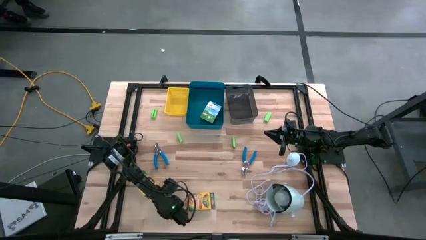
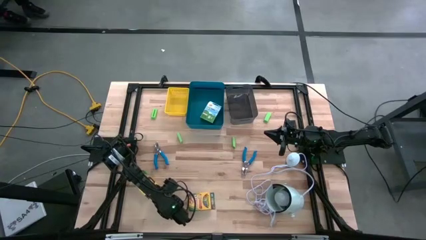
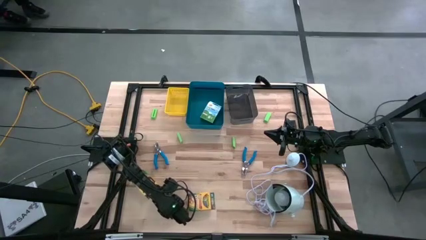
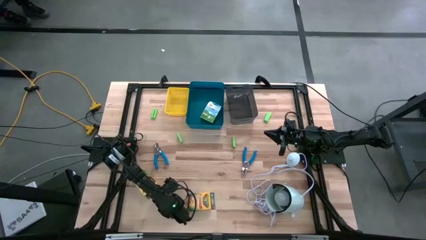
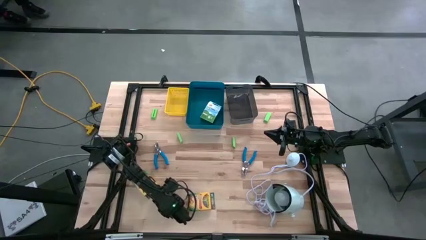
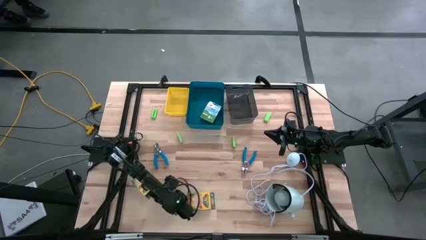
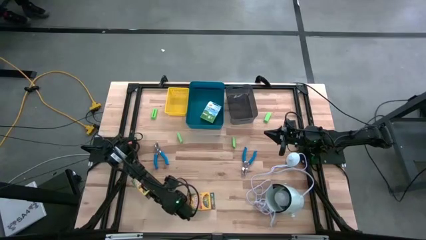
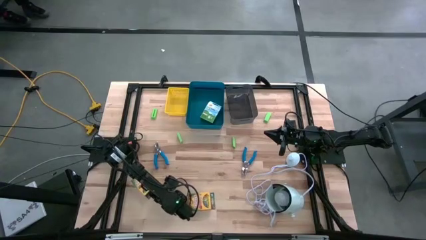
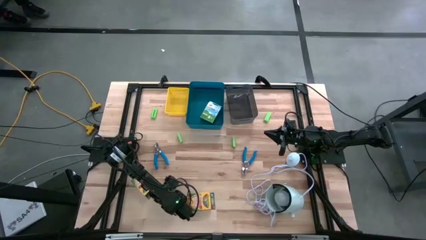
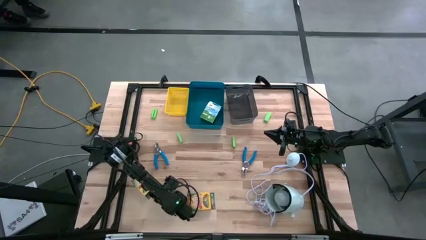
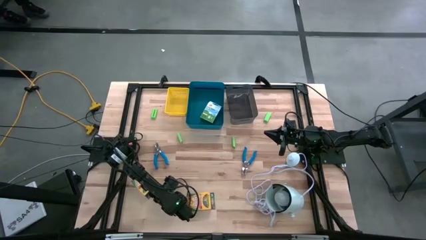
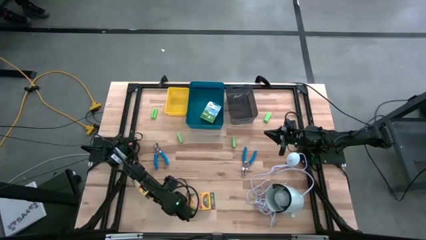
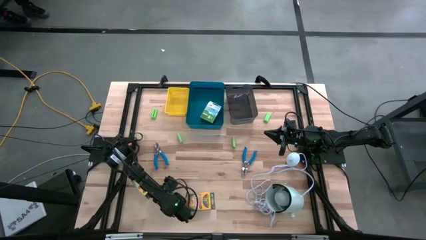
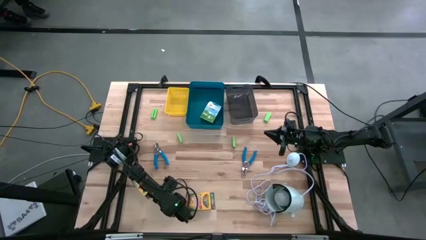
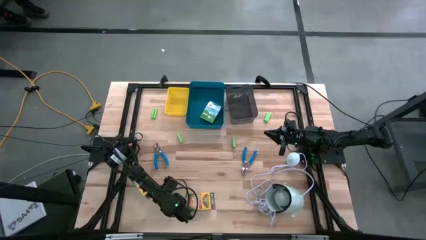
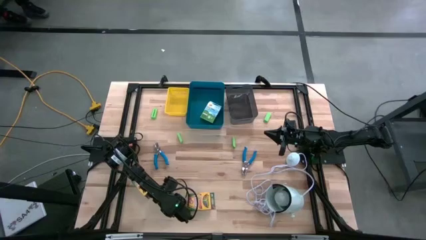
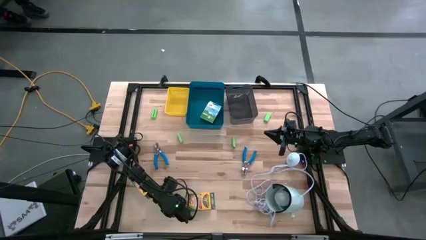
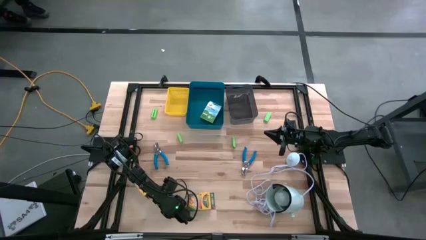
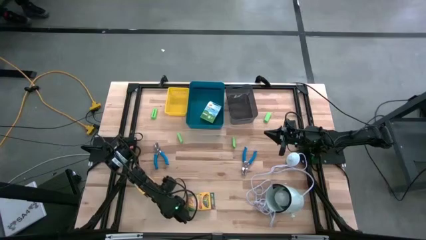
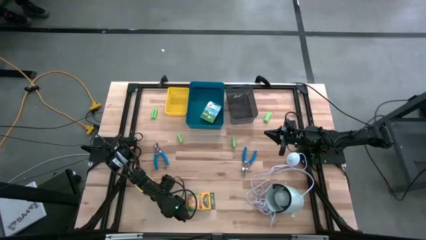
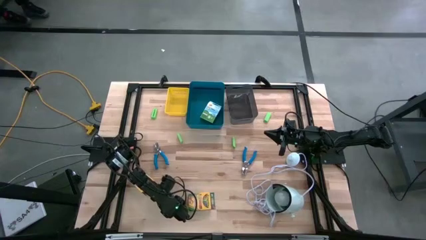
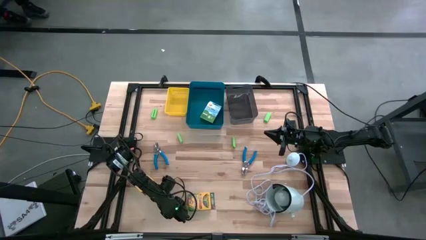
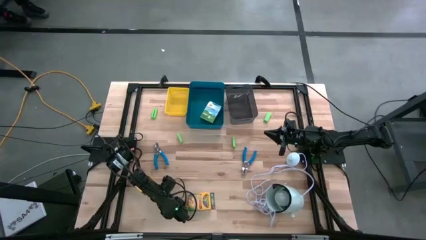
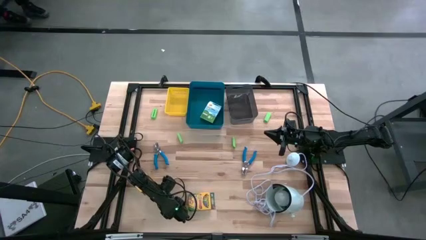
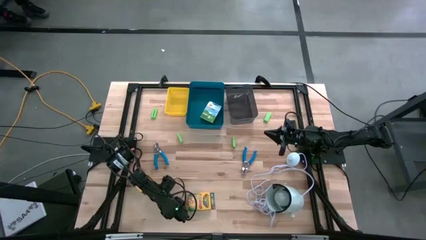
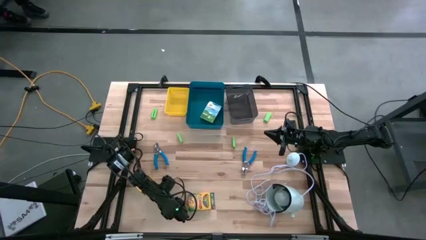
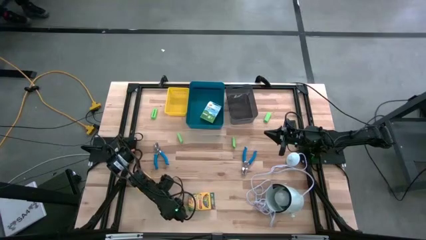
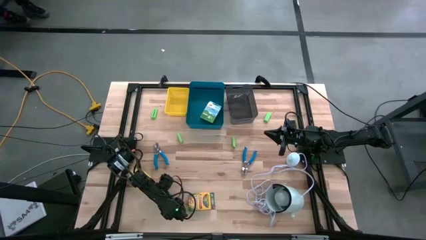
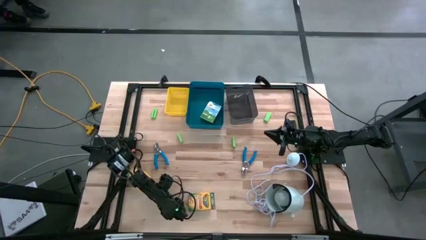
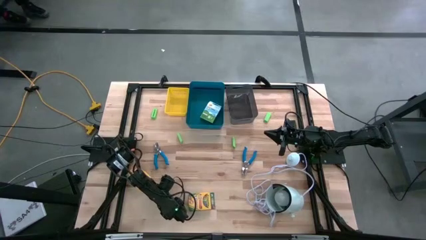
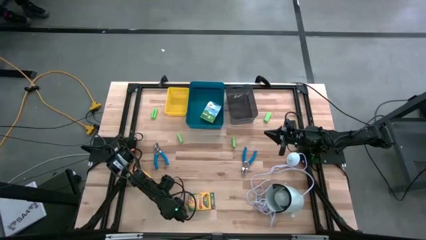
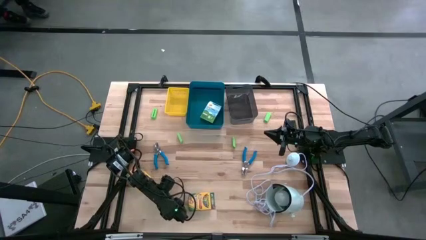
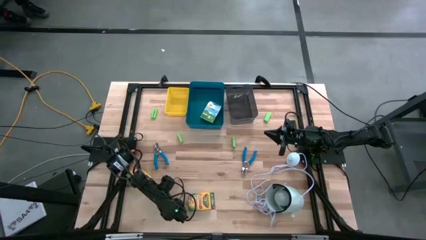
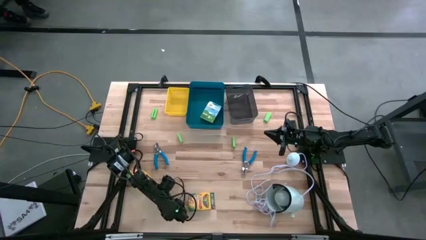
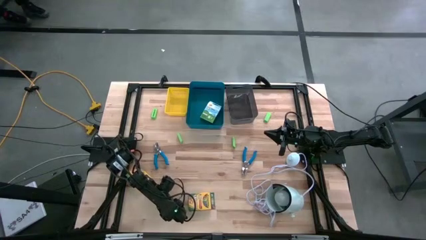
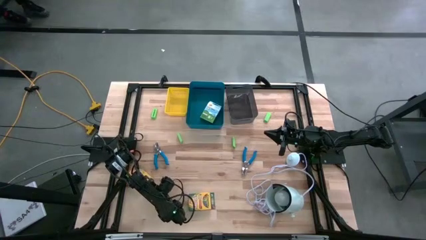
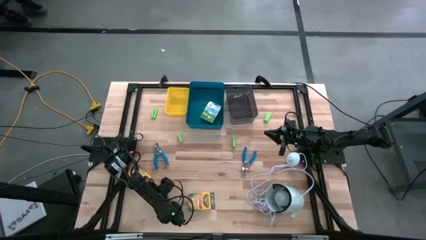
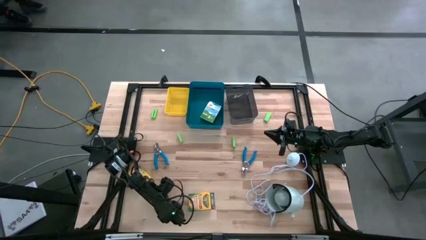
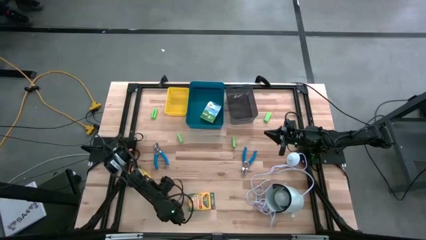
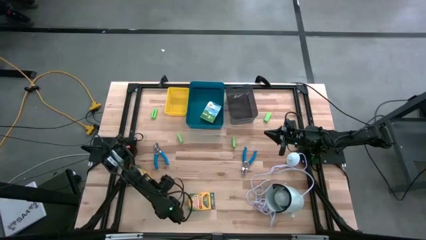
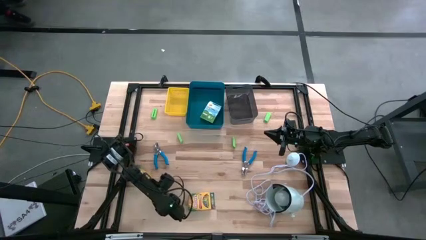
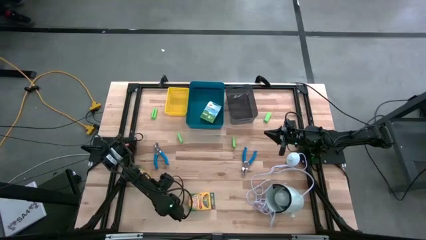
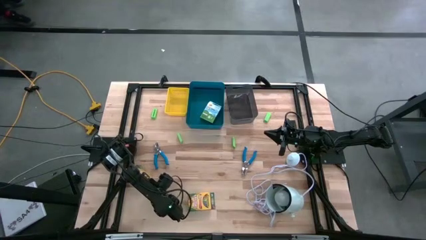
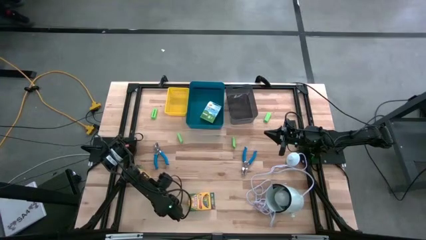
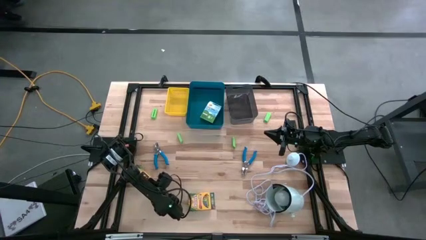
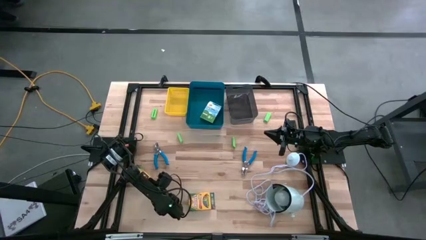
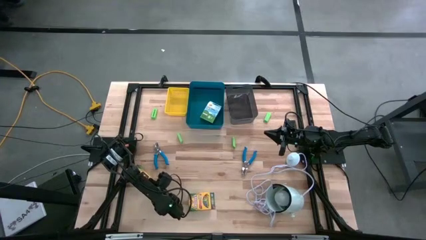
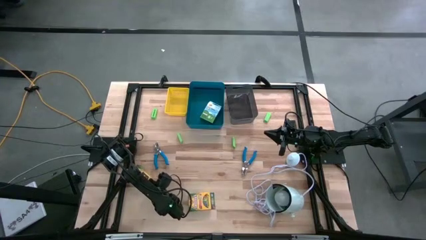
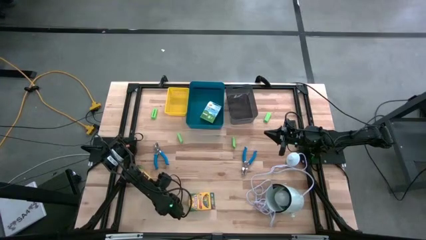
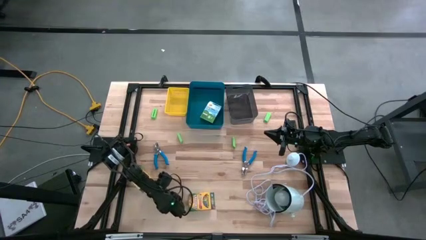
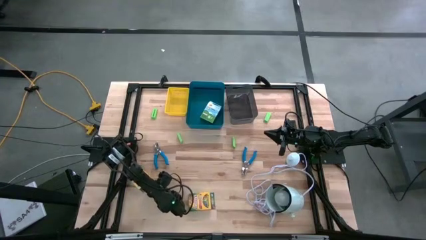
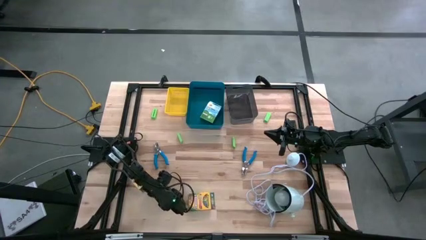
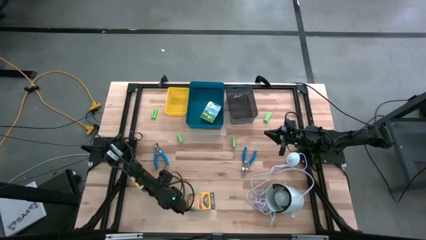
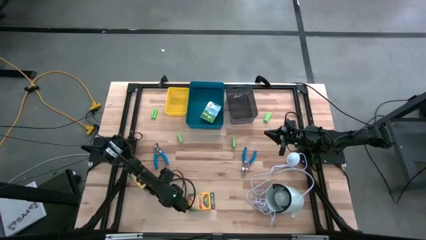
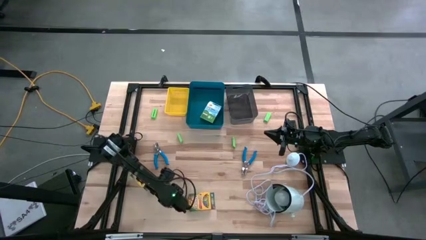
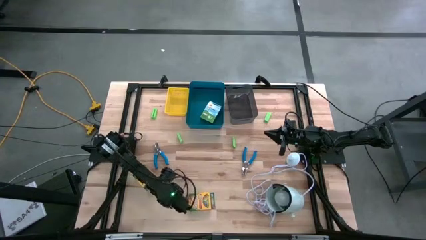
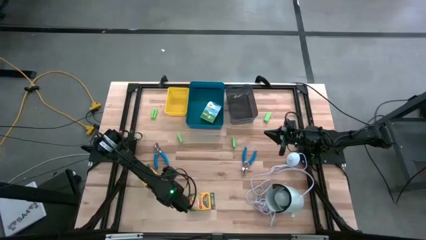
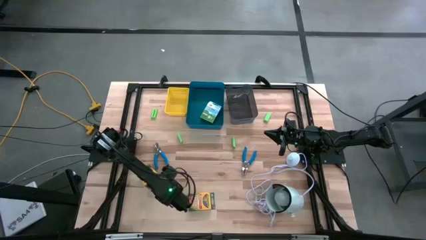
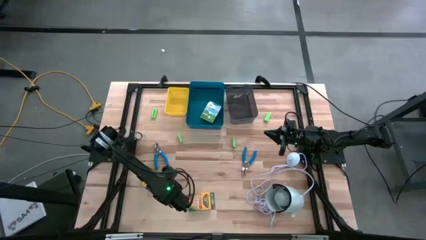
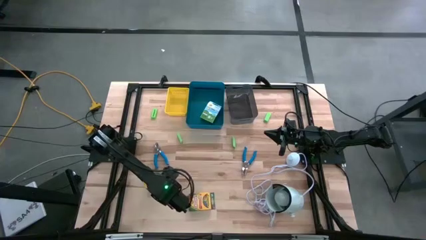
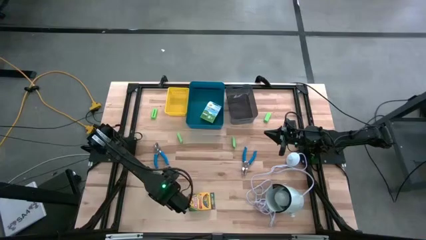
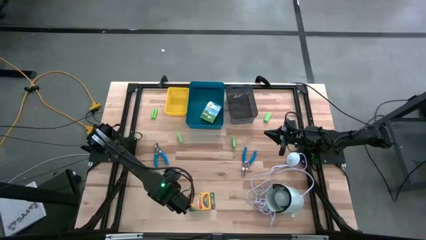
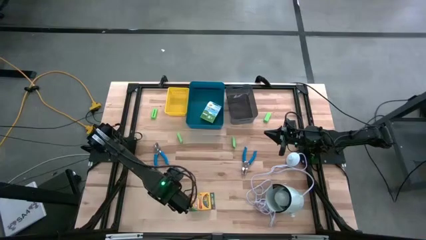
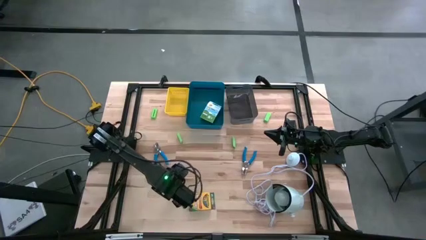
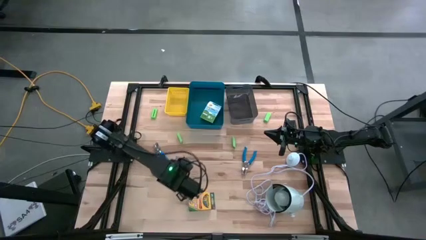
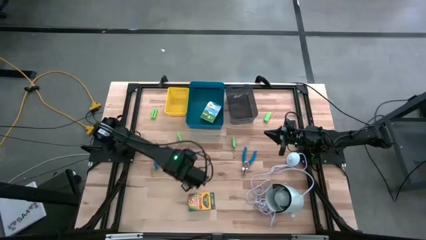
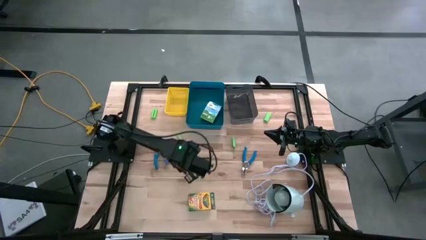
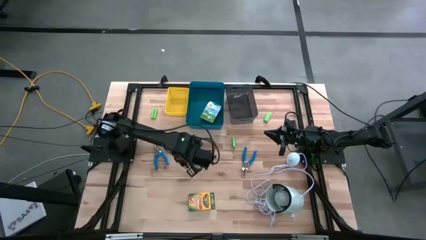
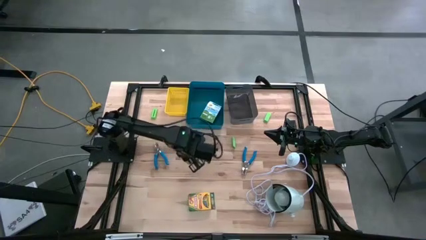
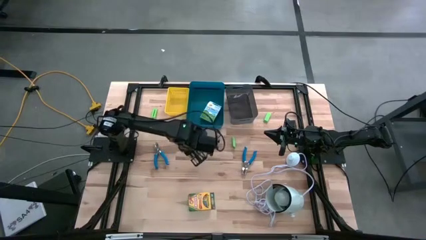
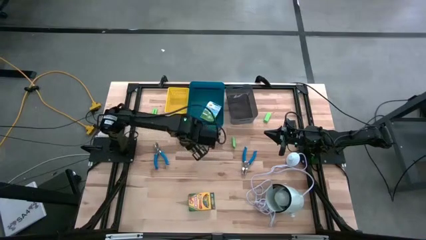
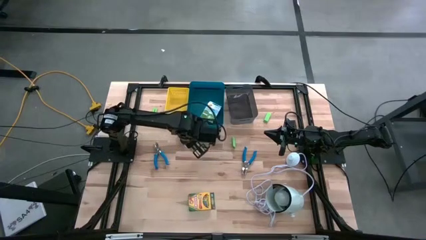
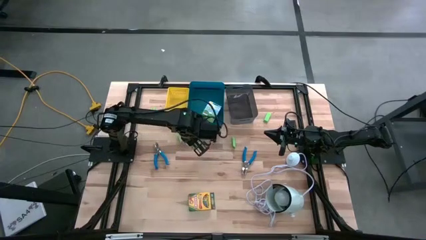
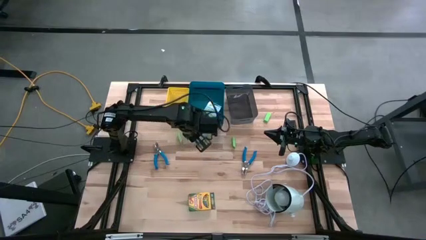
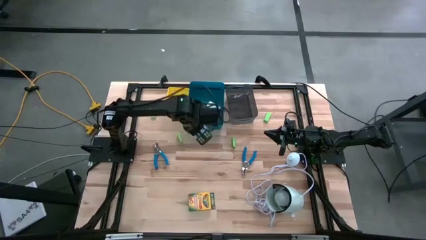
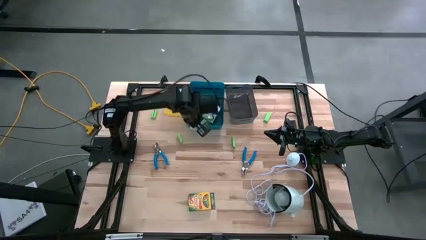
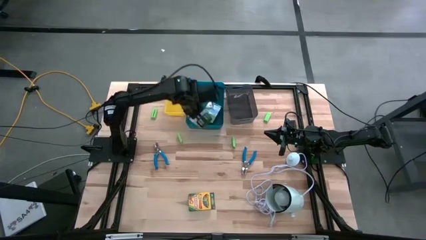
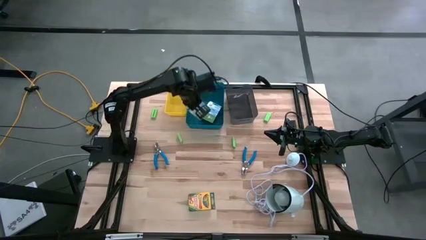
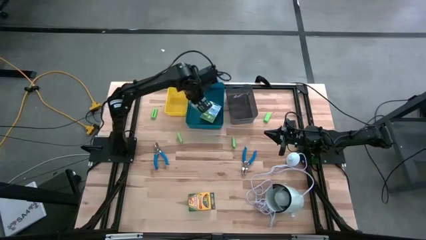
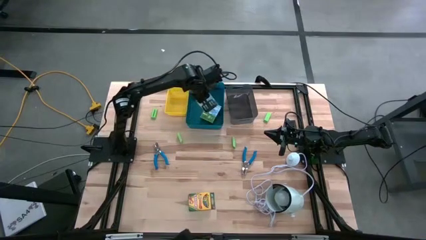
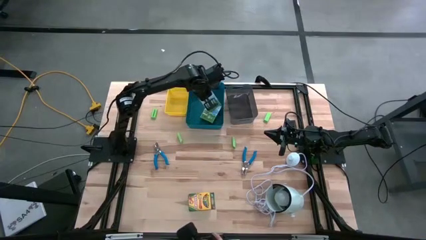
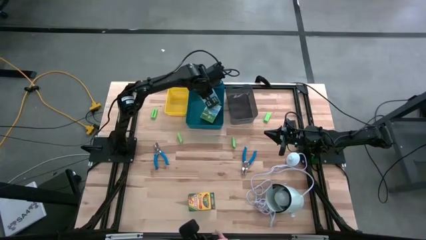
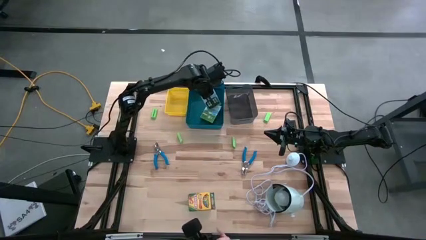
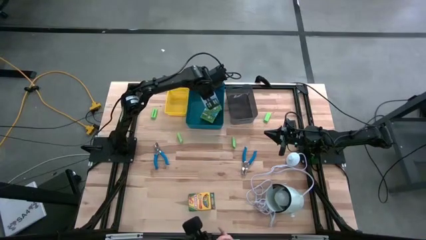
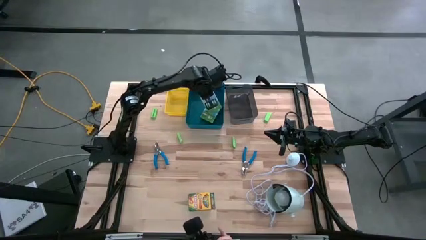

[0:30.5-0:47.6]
Task: Pick & Place School Supplies
Put the crayon box into the blue bin
